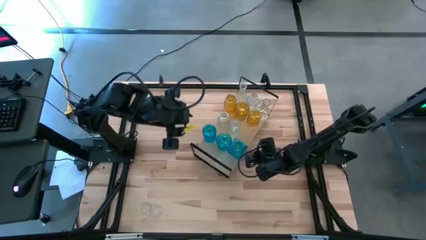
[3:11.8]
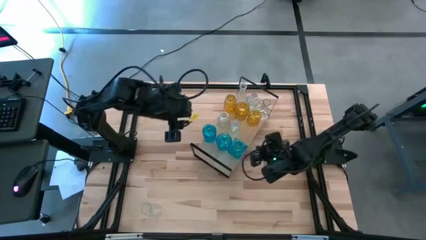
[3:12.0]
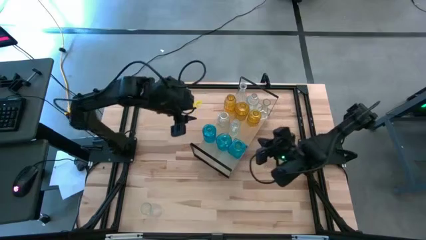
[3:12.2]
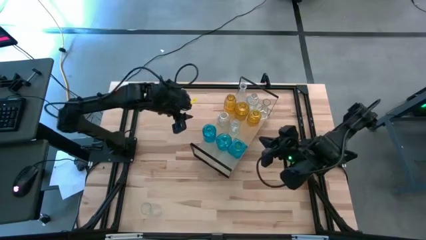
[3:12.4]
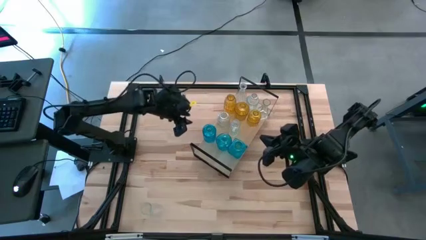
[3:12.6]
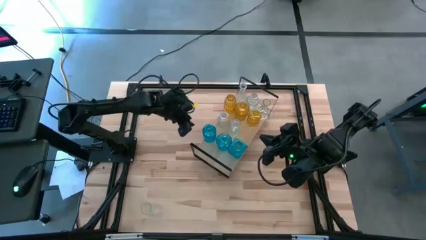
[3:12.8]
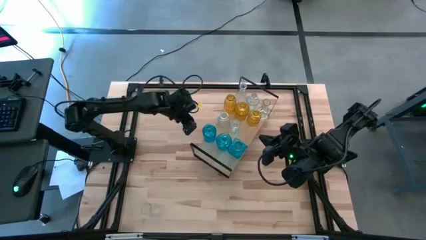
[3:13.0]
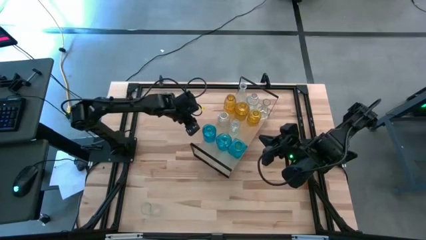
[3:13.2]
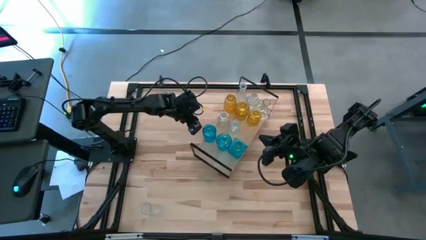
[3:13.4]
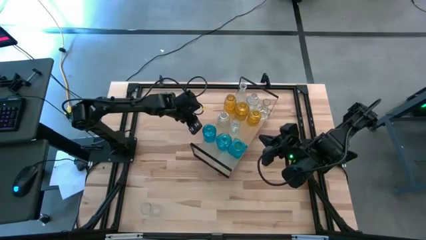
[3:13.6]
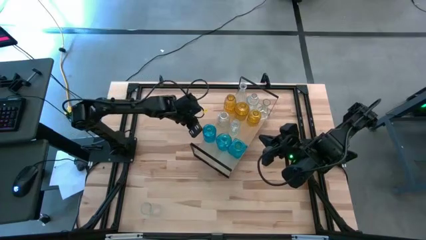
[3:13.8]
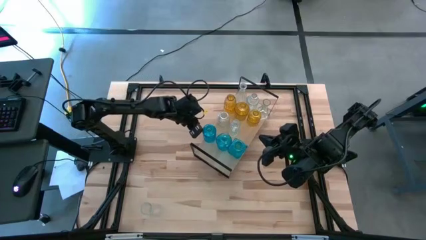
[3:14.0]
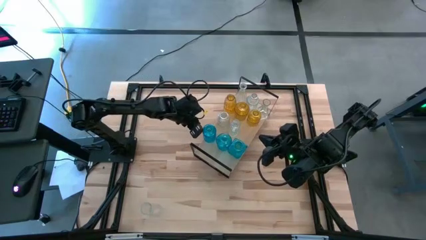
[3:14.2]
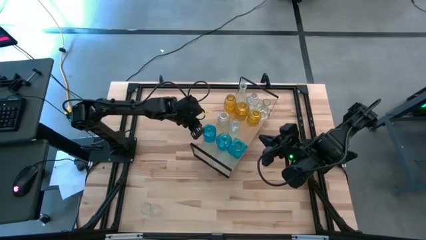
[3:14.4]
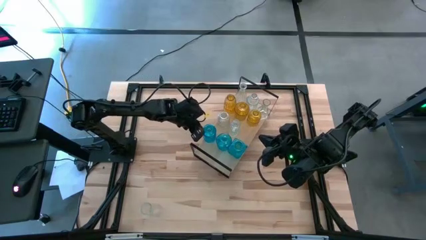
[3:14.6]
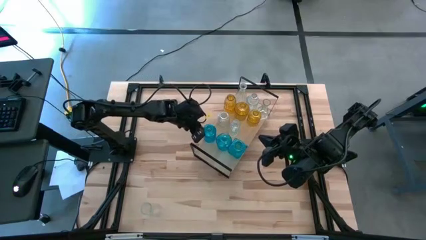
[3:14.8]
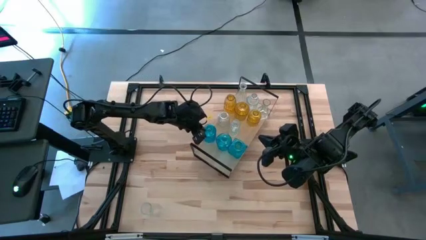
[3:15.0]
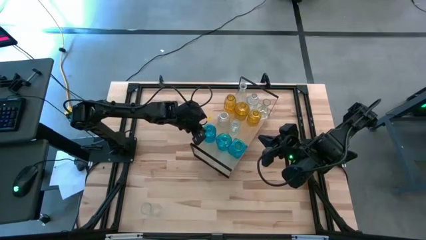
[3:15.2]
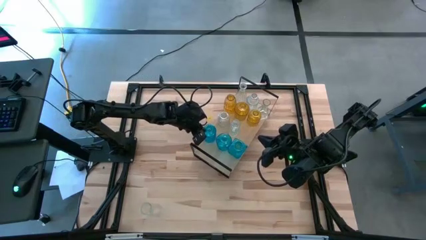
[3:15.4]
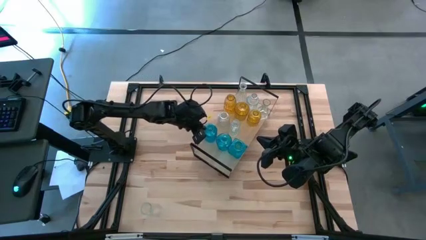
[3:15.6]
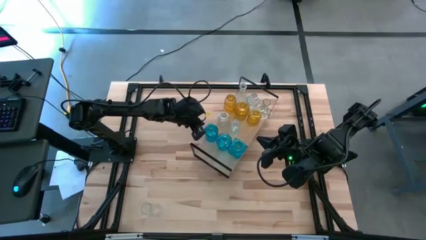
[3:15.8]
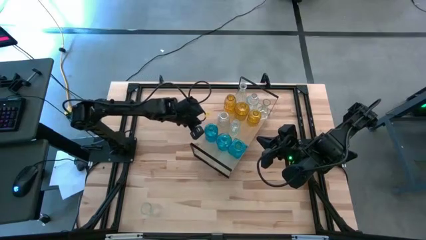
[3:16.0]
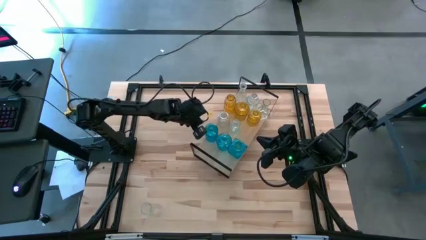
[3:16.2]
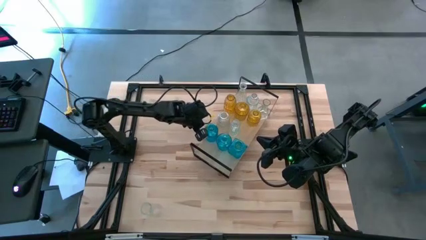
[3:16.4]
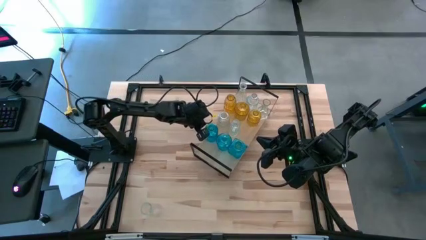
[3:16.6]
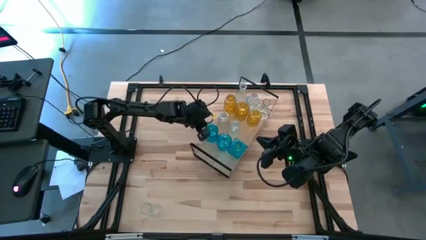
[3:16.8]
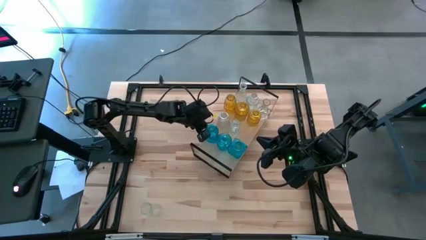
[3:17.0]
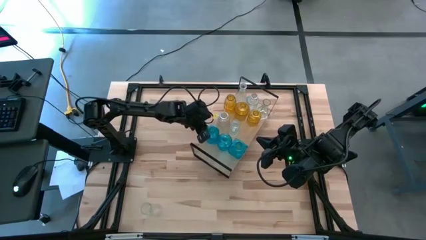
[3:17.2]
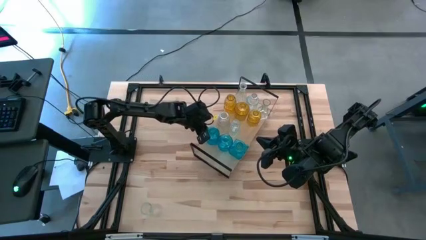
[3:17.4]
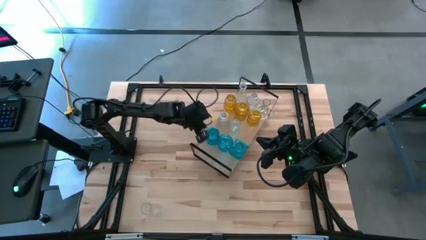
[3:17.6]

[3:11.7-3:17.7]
Task: sort vases onto shelf
Put the blue vase on the shelf and align with the other blue vase

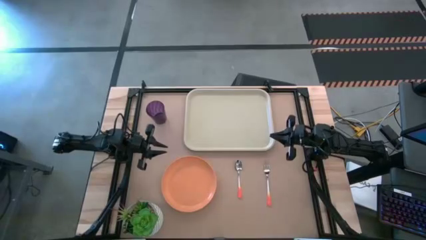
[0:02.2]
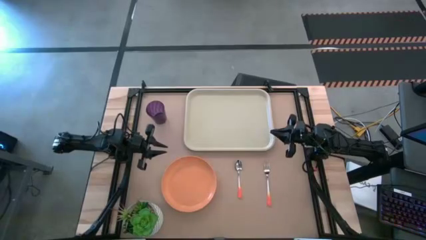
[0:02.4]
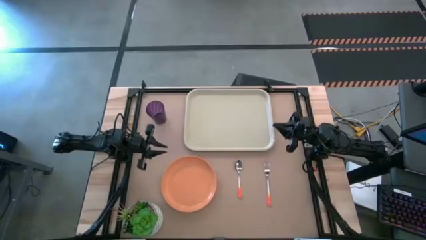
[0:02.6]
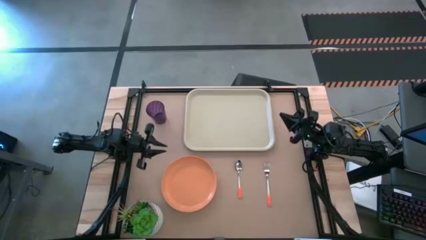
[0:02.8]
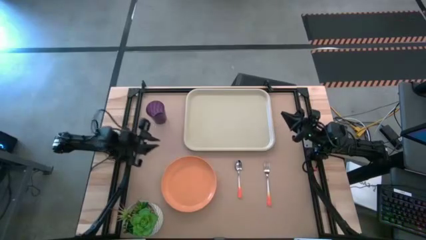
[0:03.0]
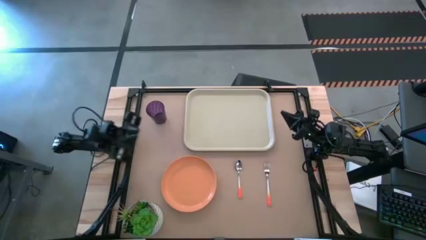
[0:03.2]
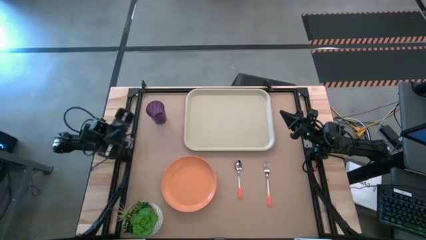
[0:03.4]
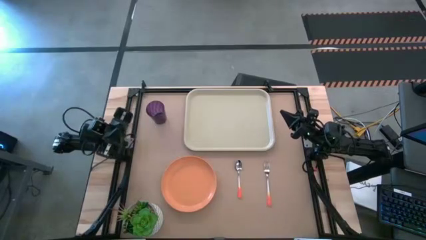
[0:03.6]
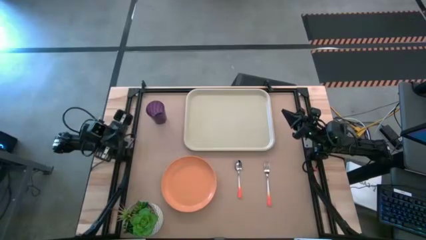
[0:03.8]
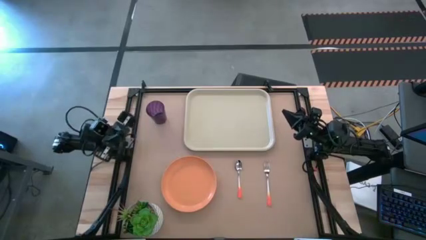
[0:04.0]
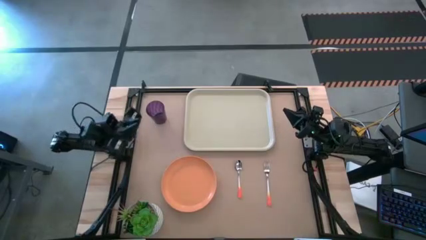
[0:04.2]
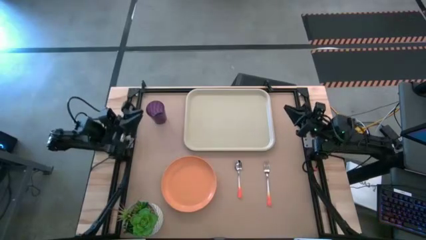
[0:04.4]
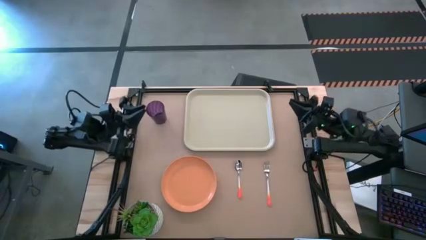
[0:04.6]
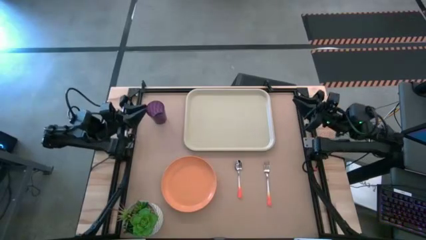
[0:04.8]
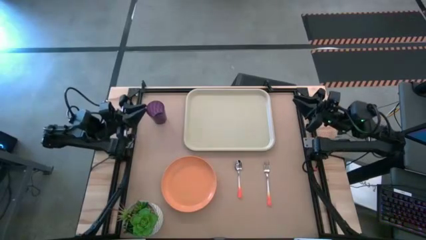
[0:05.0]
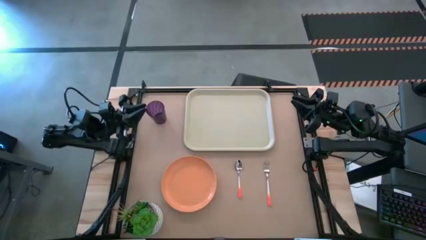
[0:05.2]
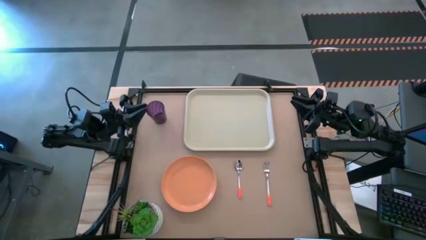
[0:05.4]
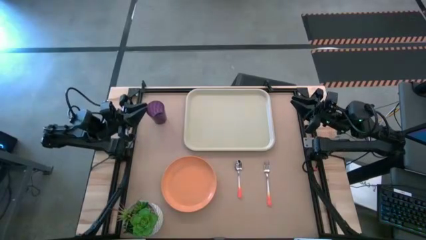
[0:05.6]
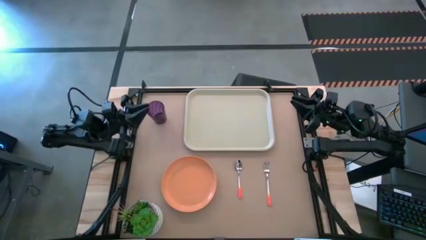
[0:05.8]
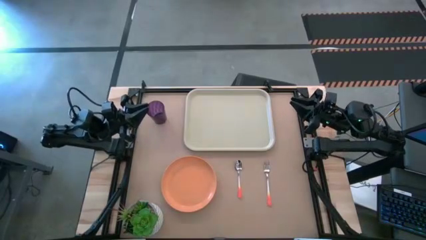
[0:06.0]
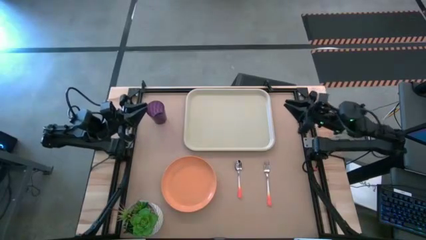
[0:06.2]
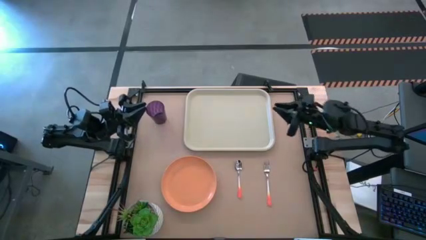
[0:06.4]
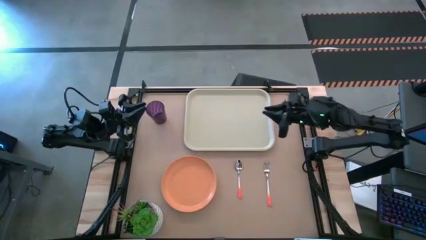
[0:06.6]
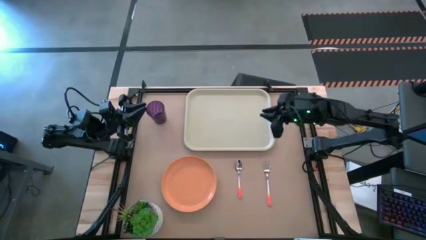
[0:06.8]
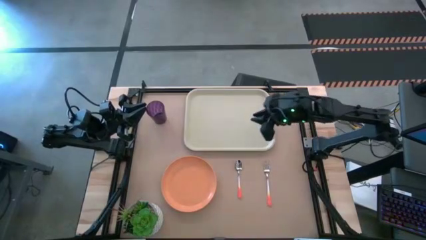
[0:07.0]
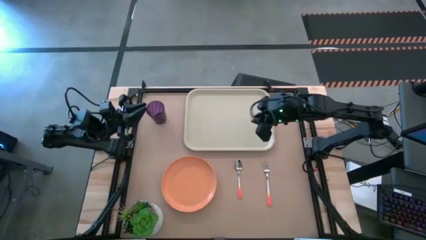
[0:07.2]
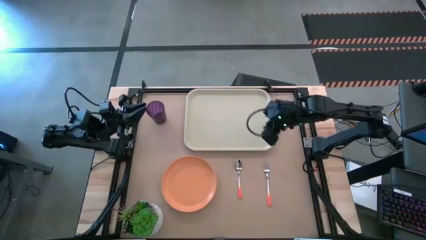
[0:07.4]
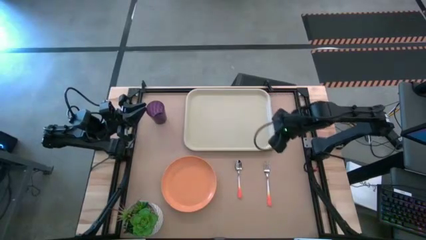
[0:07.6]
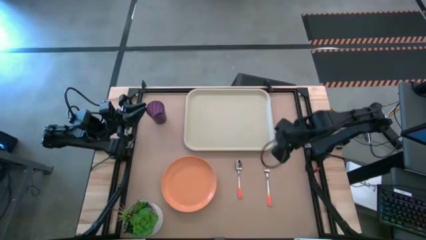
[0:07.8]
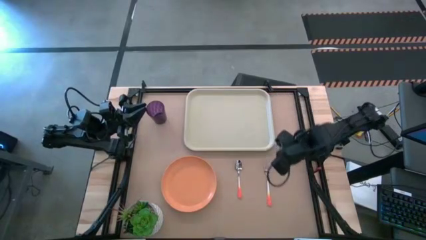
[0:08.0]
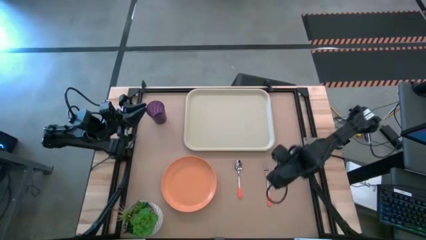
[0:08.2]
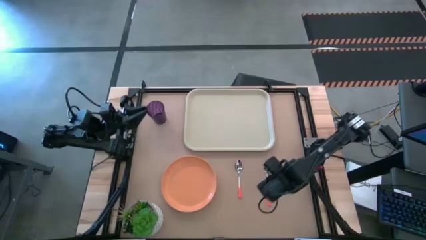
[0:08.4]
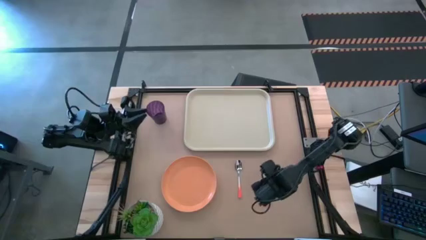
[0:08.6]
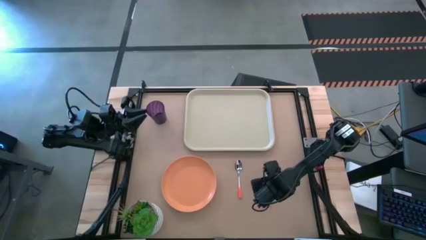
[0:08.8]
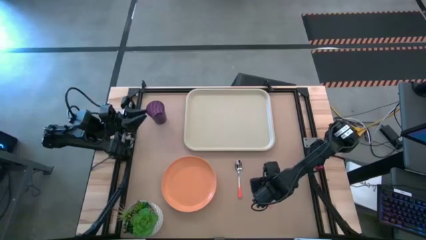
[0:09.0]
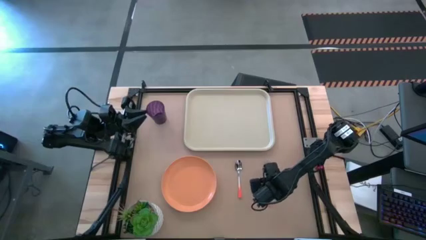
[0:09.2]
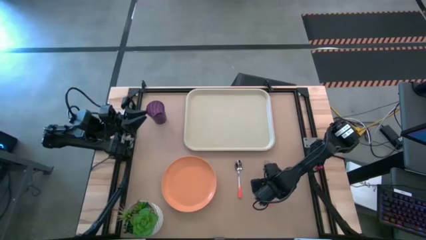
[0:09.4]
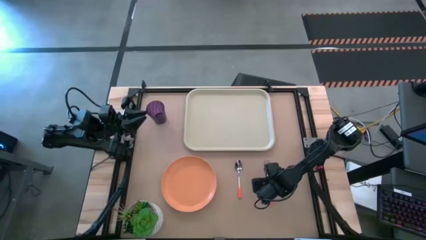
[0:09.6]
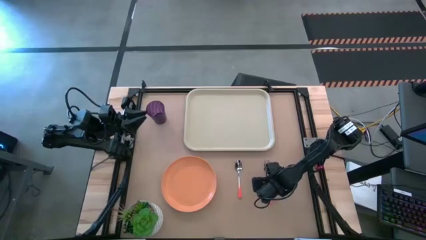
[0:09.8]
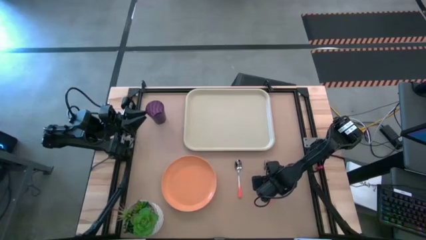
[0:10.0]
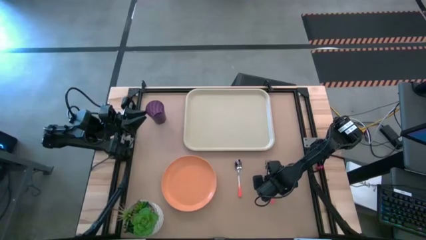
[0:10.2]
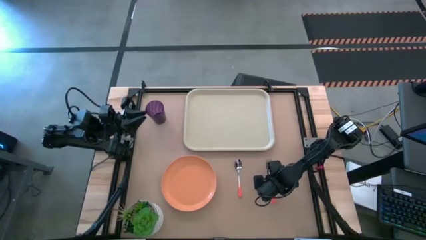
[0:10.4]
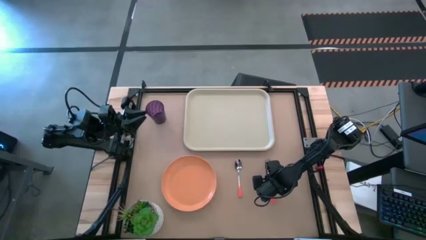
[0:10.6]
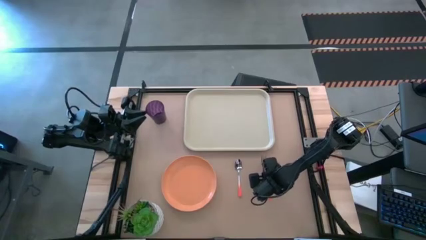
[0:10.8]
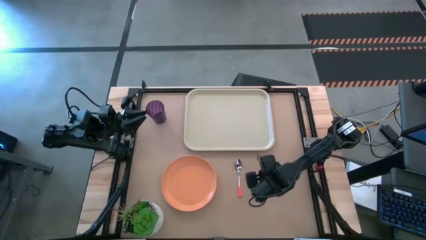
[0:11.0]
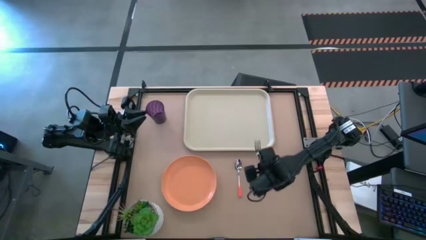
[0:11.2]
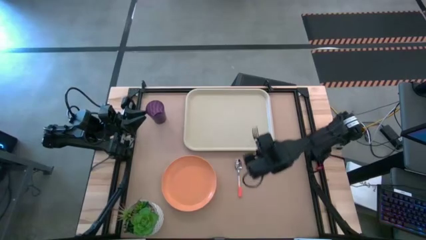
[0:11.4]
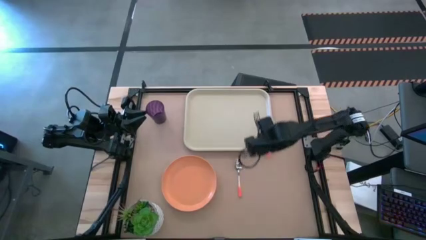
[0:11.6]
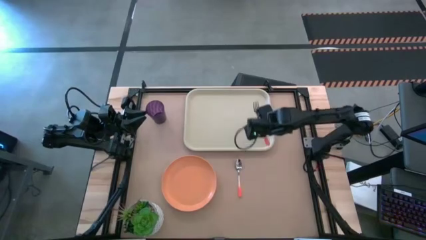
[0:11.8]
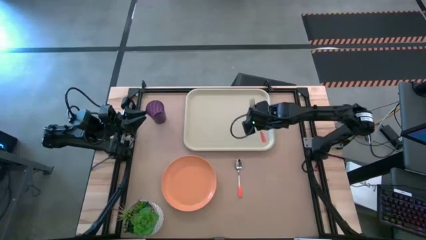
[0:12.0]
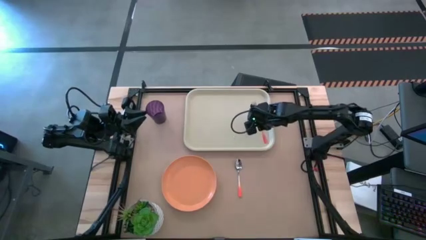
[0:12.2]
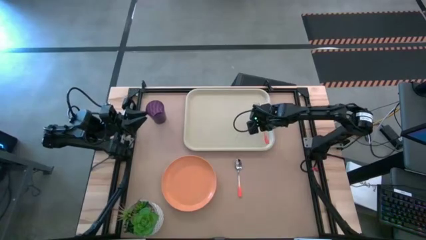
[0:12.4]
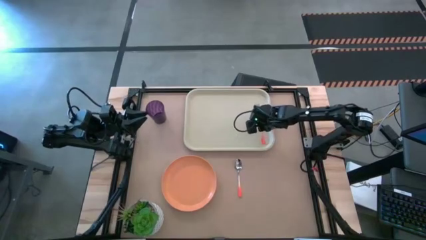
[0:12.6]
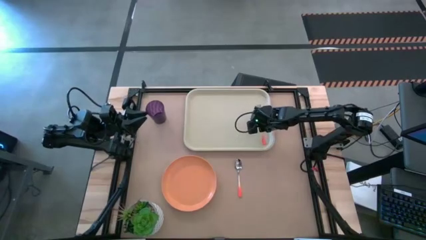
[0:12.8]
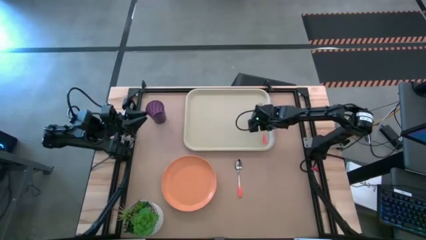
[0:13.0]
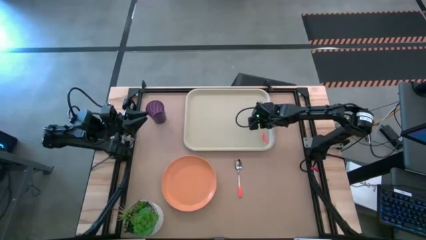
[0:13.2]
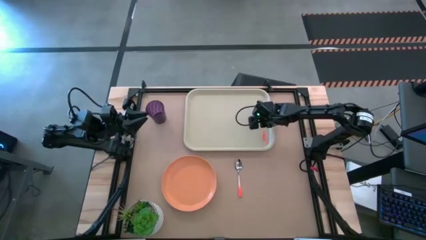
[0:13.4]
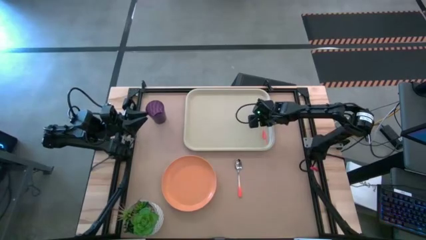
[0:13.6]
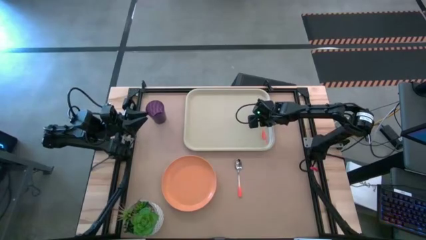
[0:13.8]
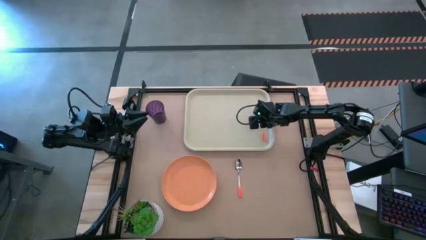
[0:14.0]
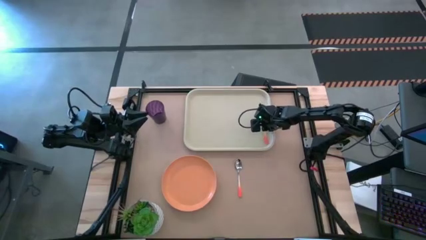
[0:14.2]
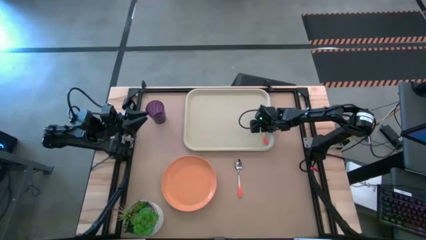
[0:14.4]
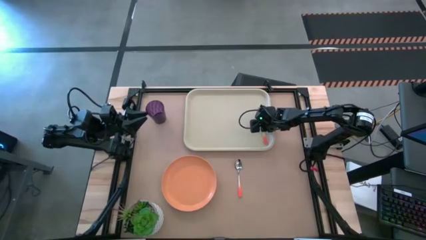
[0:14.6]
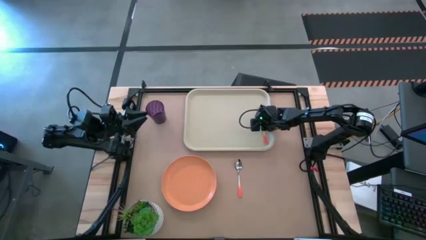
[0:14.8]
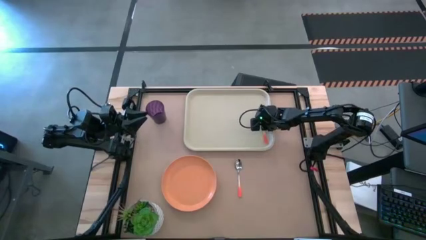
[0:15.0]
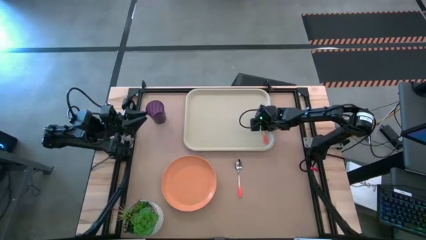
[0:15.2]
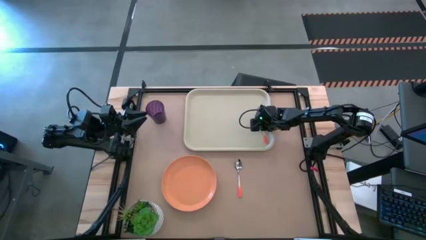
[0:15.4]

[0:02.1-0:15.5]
Task: Pick and place plate/cup/fork/spoon on tray
Put the orange fork on the right of the white tray
